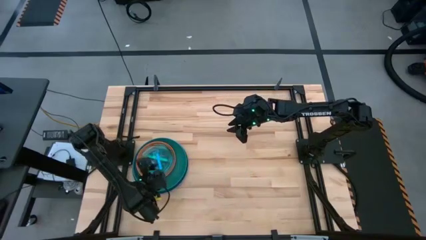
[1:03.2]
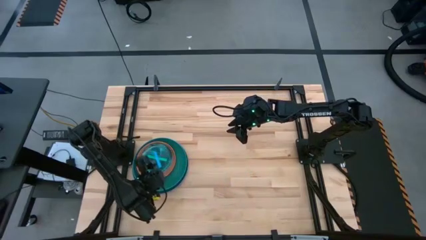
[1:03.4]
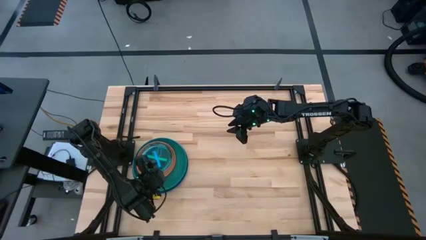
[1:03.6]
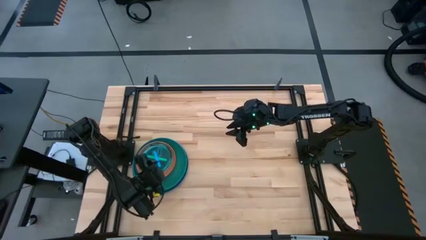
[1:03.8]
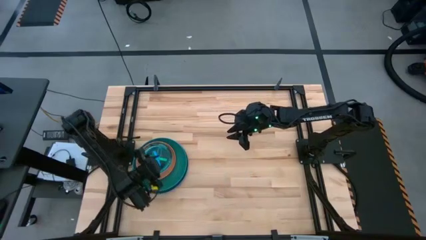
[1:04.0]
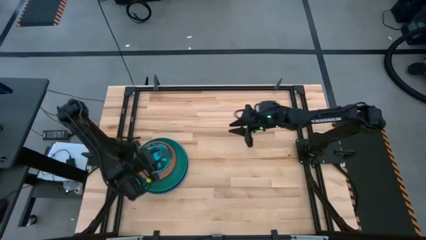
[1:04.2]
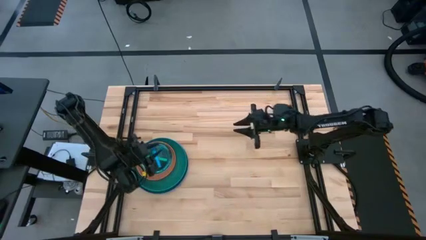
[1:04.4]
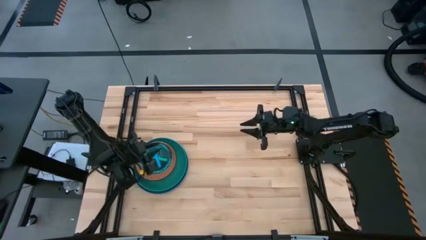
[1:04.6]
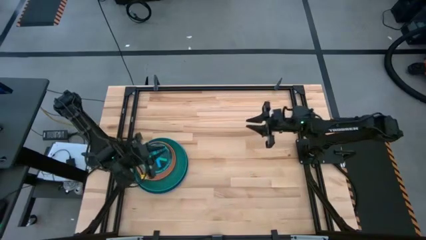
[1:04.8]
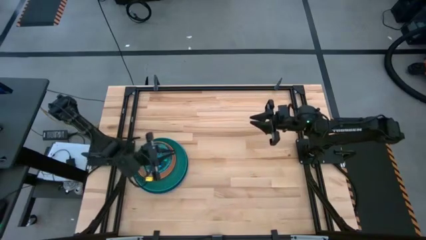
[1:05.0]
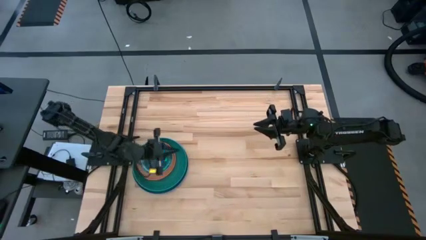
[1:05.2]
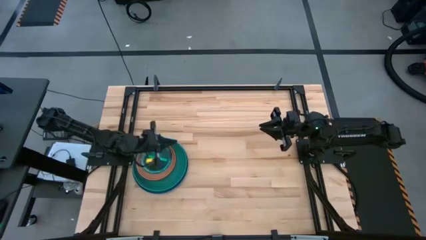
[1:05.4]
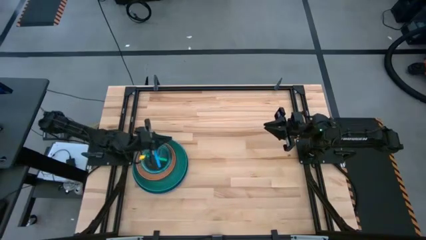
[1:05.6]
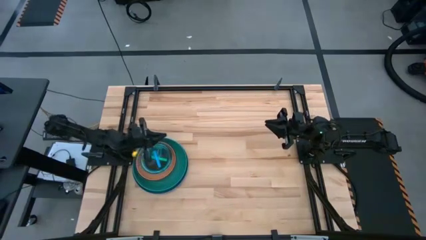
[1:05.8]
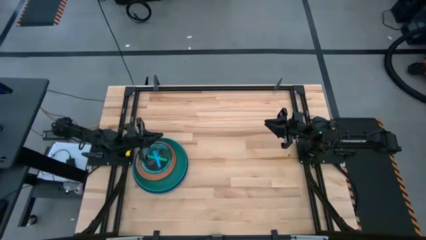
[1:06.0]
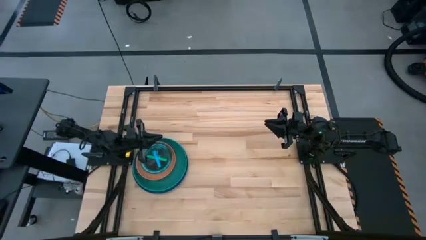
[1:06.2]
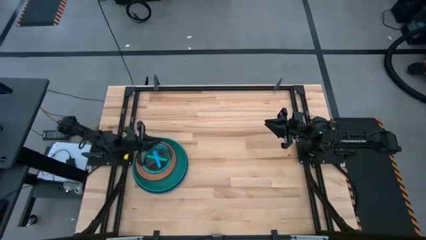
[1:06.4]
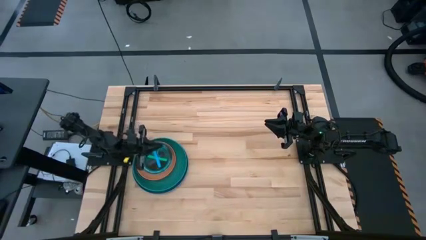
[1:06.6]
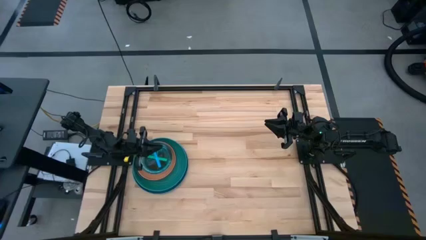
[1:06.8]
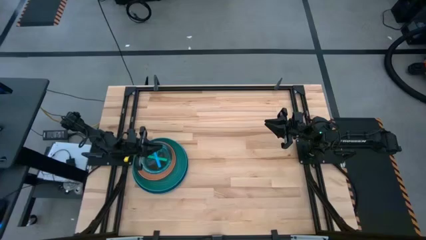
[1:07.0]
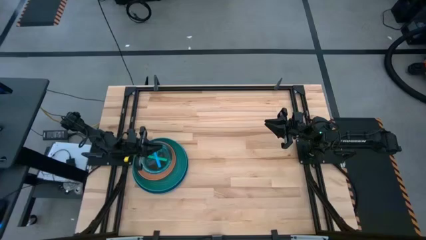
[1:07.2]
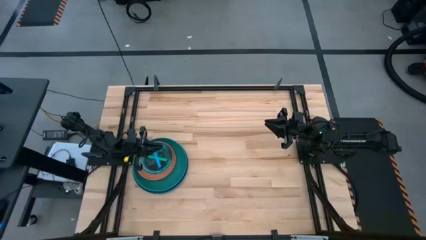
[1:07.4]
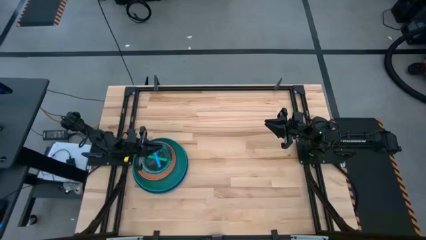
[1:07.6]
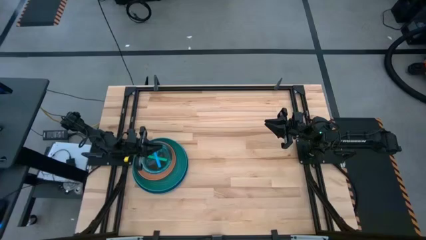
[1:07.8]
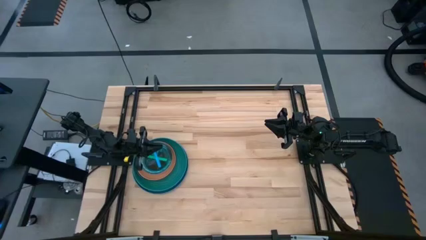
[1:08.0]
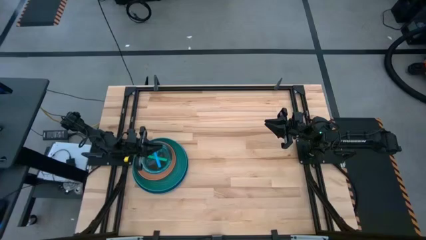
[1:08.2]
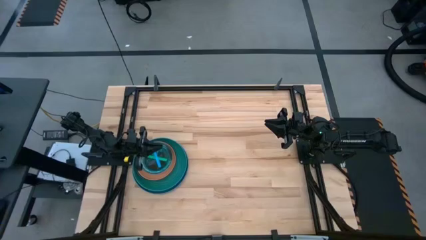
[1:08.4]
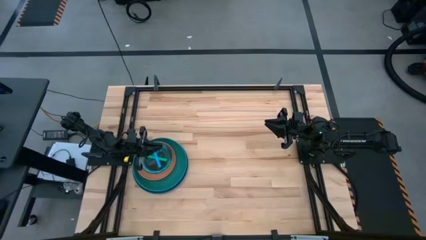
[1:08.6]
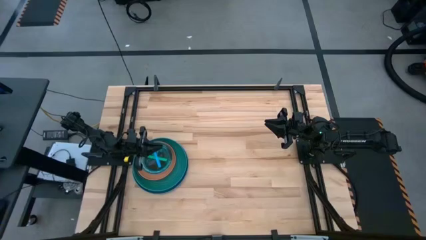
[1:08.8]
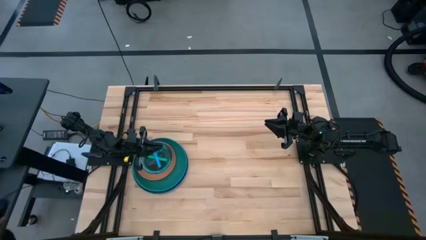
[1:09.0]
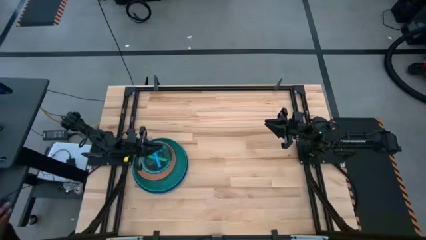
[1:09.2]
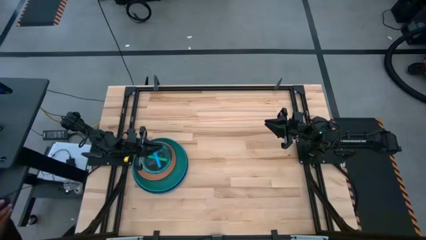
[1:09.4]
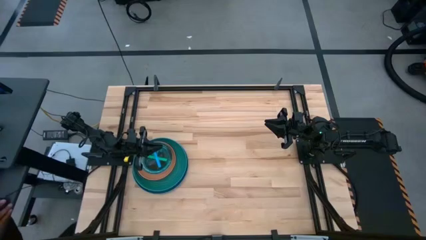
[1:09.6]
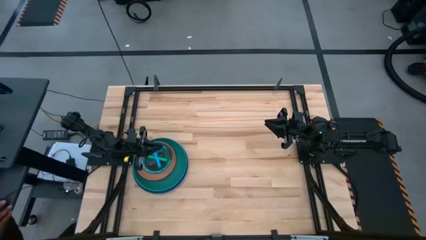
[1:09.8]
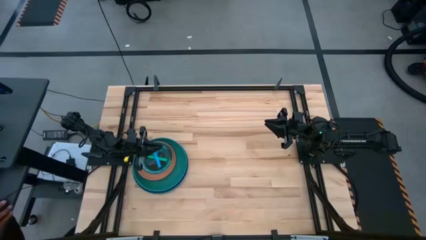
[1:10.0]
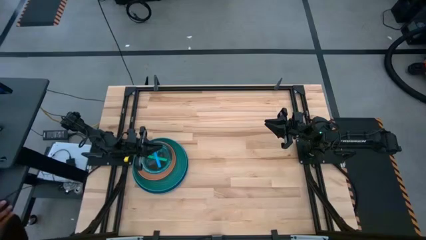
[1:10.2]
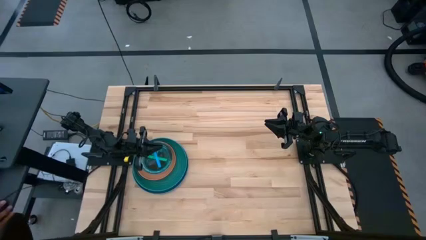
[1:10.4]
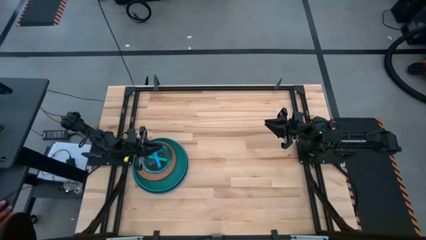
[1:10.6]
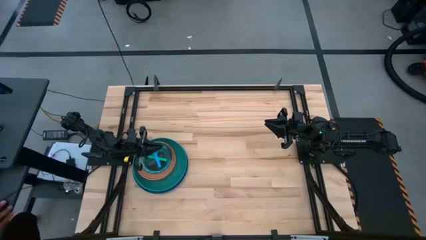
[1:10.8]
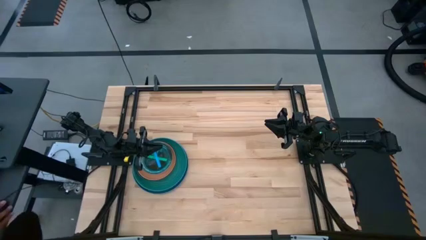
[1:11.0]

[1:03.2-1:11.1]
Task: Stack plastic plates
Return to Home Position

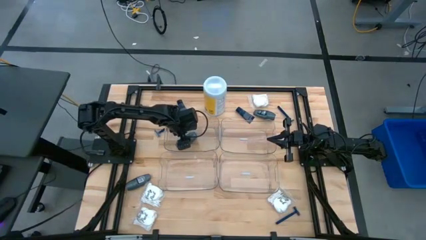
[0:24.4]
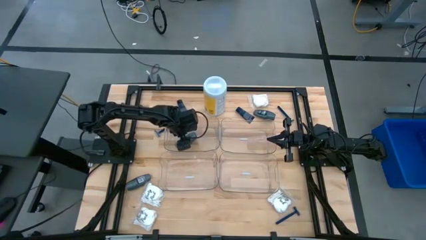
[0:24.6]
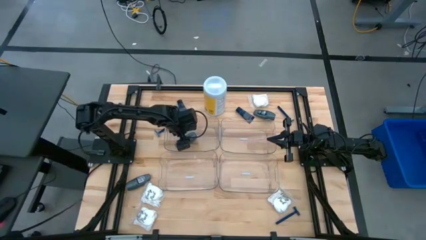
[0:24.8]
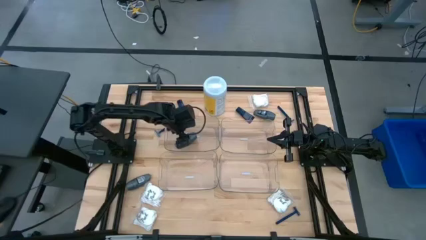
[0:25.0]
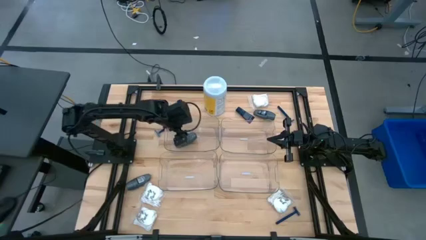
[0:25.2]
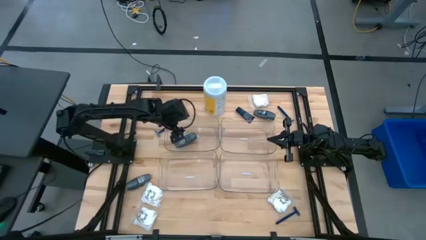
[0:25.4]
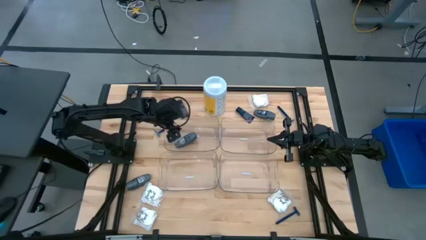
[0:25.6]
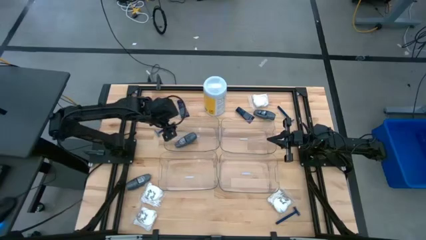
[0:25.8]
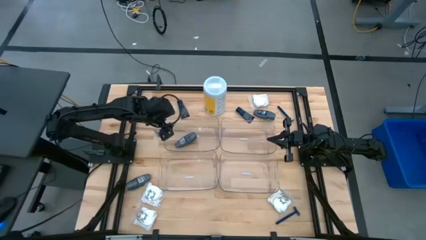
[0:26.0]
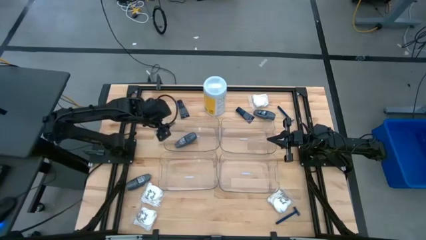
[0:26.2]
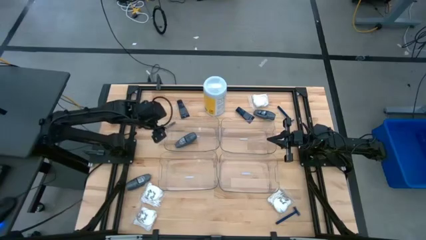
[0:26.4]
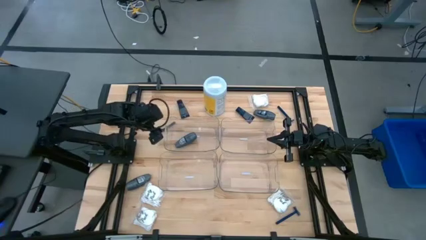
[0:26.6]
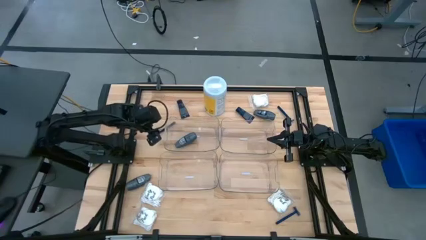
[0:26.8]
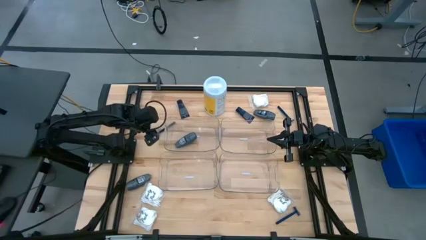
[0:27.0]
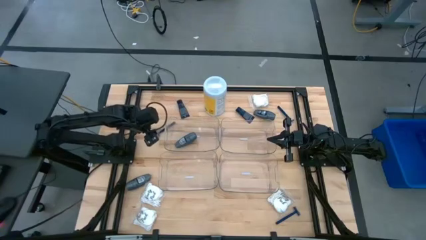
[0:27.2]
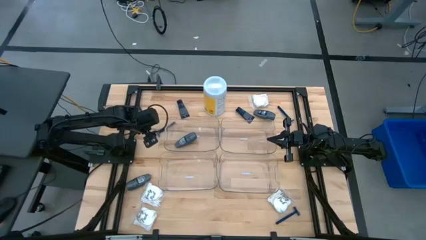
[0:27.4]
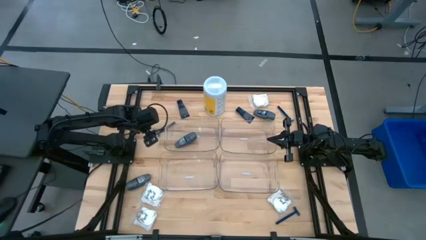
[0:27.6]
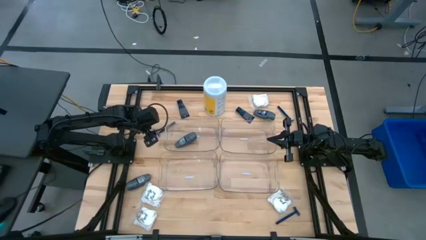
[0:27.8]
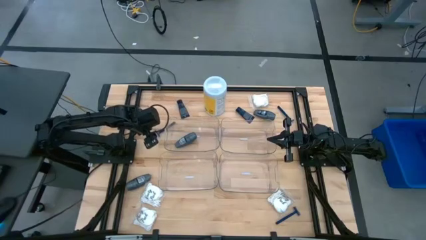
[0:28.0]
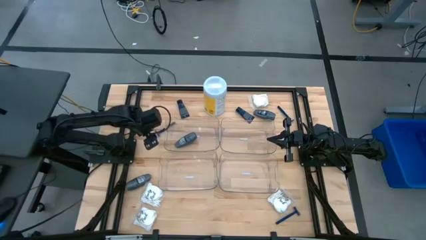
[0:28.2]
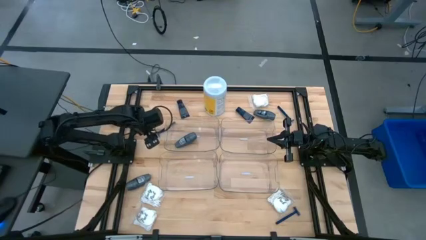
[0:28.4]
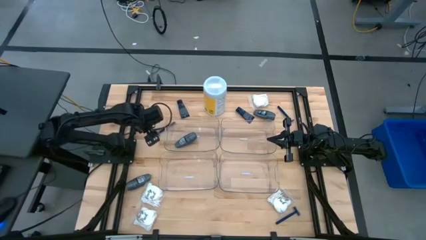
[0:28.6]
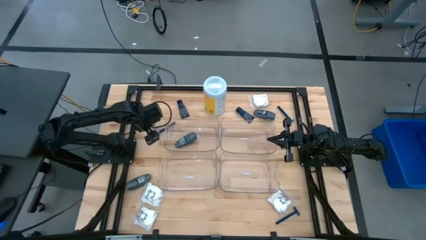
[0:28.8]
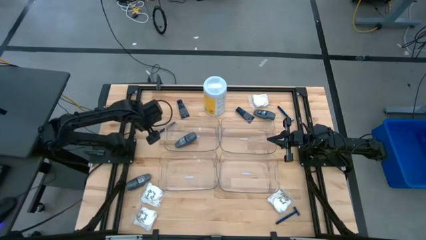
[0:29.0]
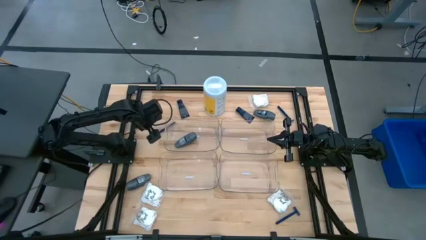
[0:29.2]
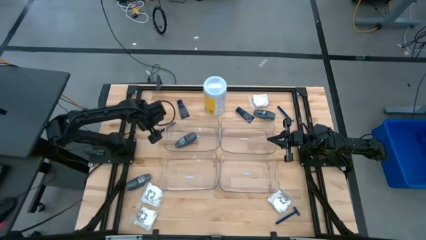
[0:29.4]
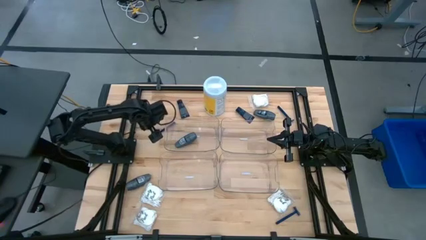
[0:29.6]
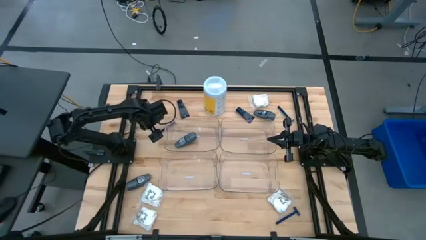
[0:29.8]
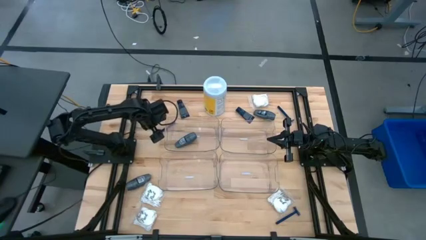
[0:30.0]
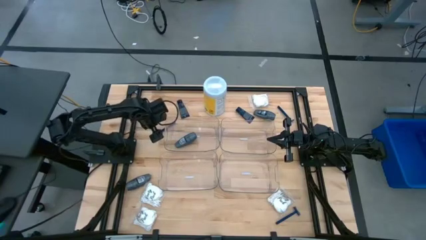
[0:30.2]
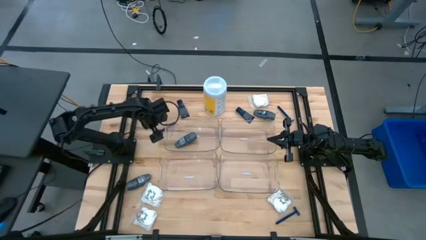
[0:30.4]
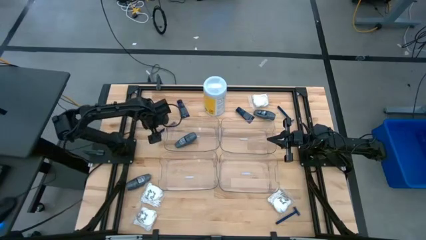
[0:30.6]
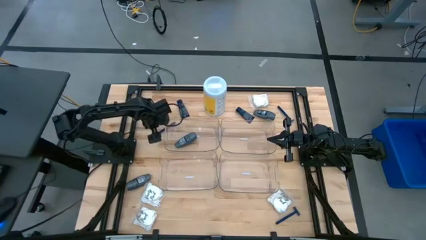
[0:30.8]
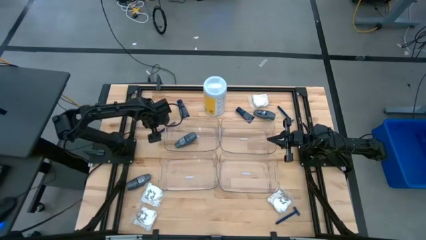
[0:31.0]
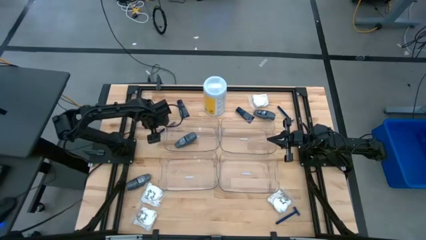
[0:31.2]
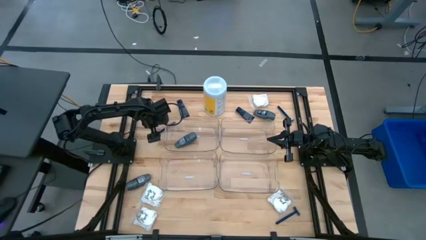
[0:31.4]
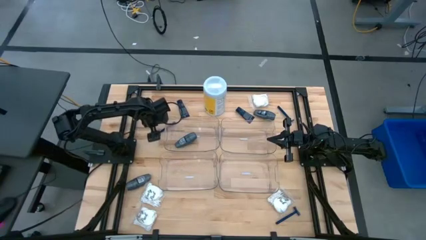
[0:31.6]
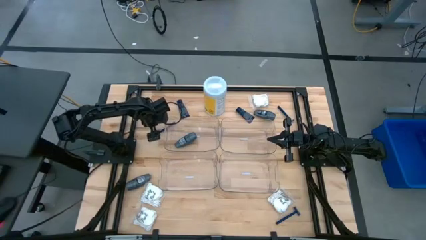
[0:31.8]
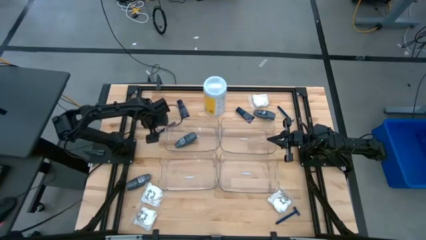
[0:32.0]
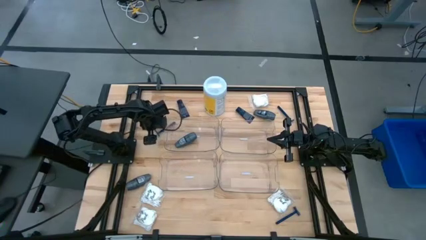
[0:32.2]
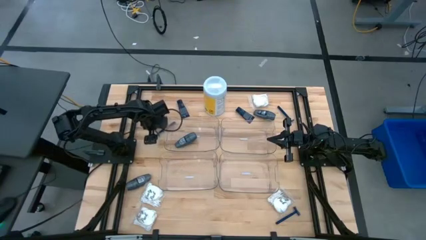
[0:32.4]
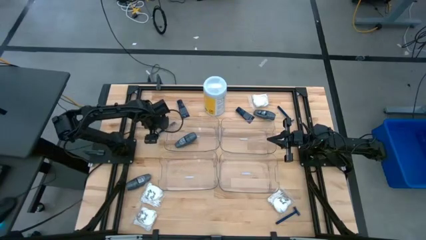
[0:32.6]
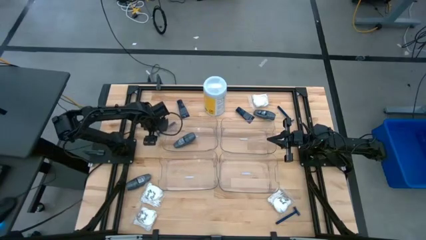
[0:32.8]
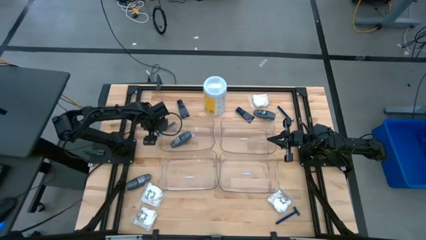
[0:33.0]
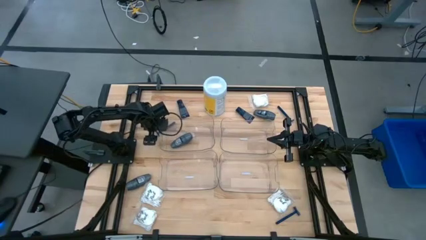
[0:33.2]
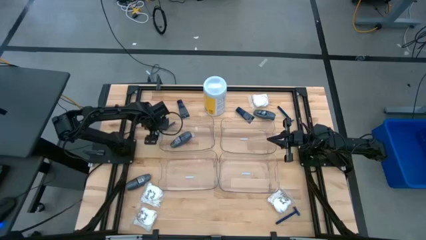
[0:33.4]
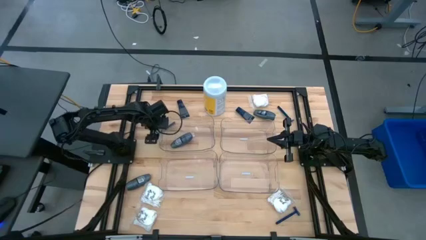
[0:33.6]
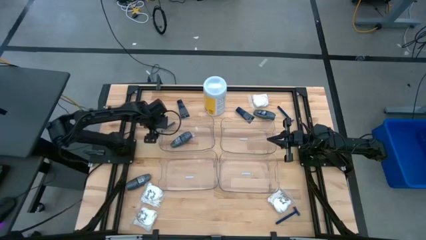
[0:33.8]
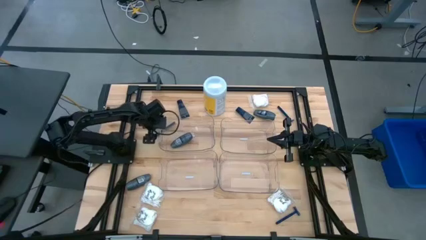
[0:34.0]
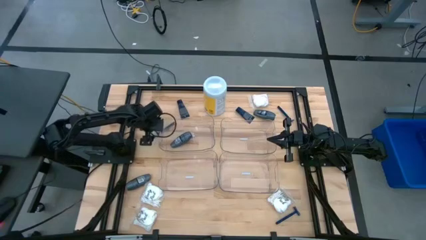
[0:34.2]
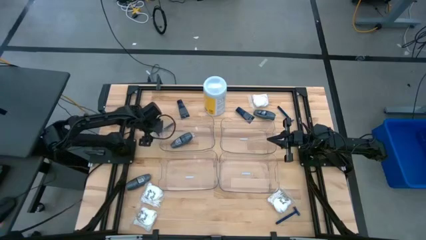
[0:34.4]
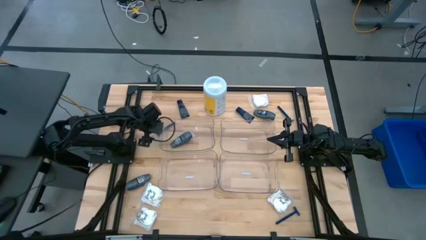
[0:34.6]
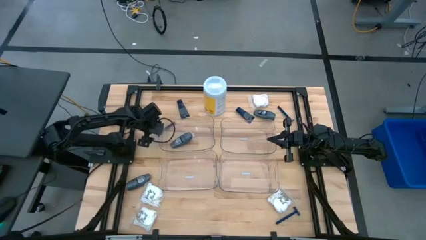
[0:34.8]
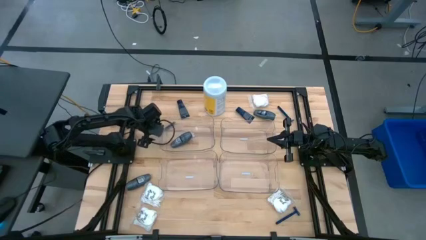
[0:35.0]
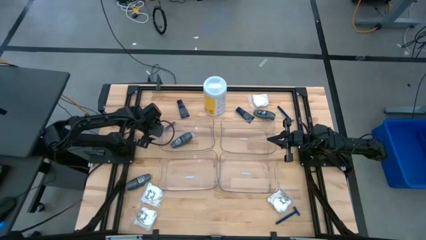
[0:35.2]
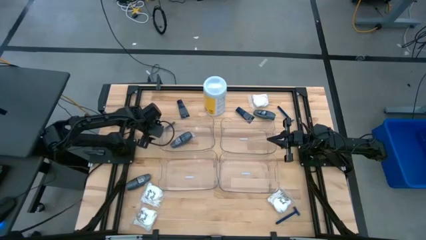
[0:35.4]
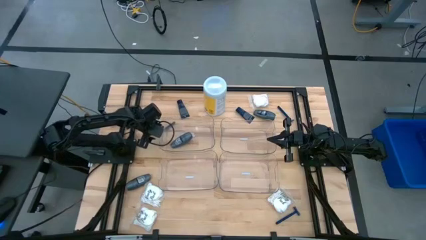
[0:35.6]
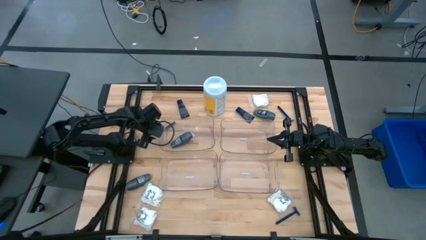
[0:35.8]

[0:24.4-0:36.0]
Task: Pick & Place Travel size toiletries
Put the left blue shaver into the bottom left transparent bin
